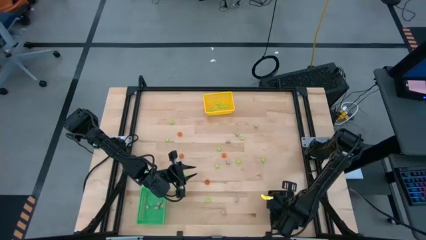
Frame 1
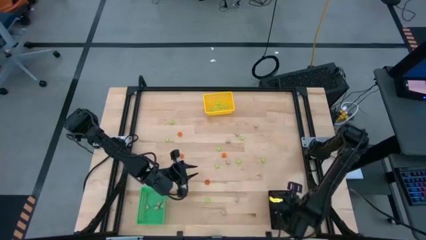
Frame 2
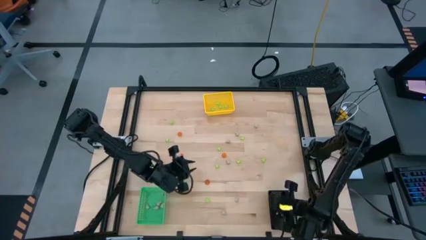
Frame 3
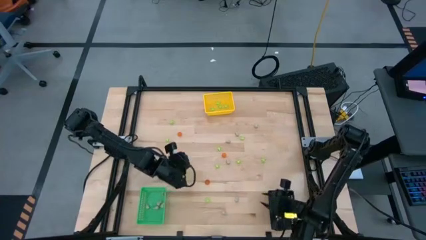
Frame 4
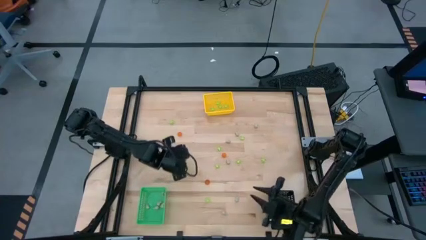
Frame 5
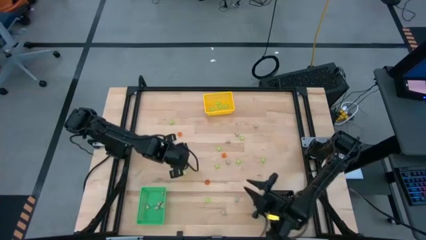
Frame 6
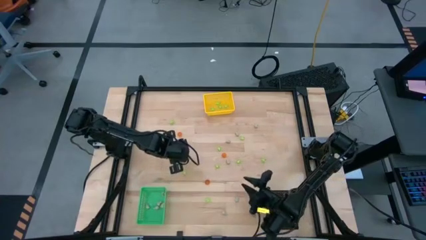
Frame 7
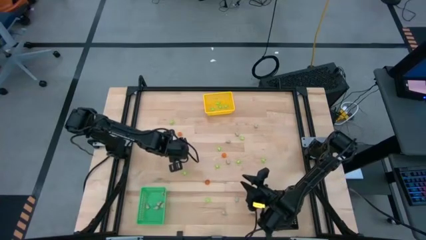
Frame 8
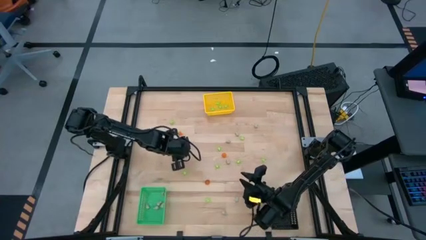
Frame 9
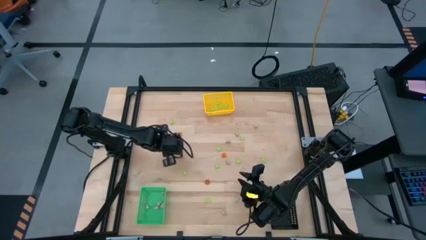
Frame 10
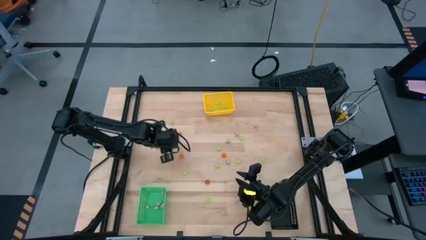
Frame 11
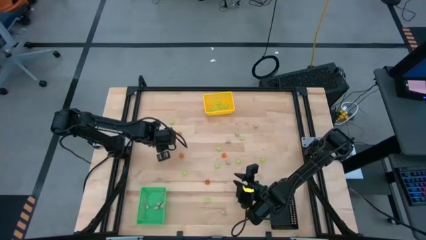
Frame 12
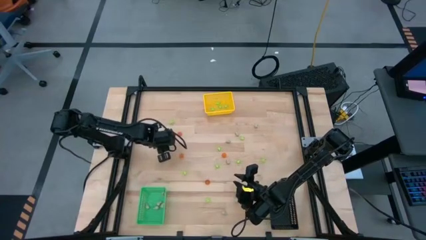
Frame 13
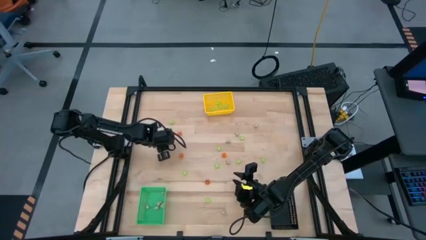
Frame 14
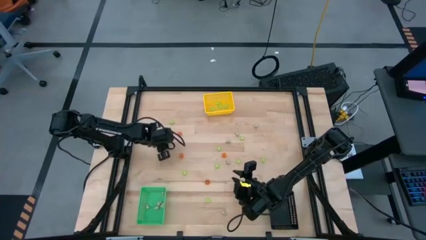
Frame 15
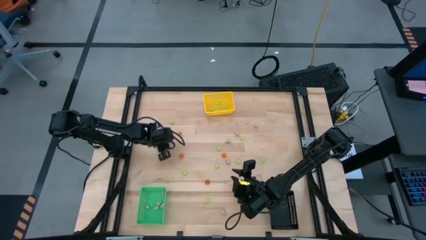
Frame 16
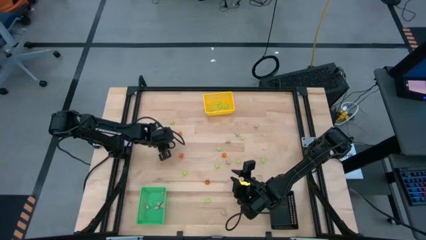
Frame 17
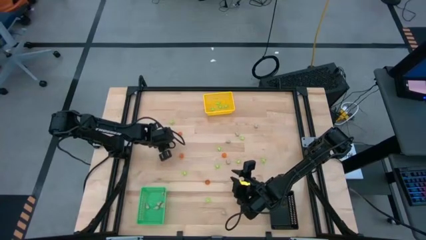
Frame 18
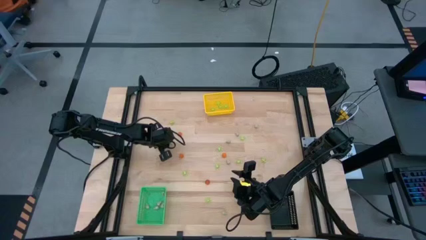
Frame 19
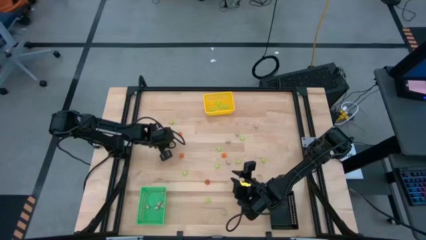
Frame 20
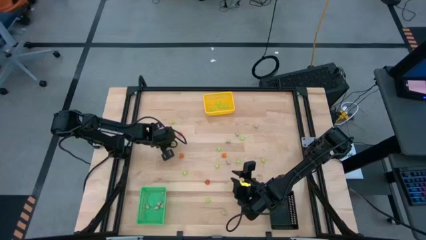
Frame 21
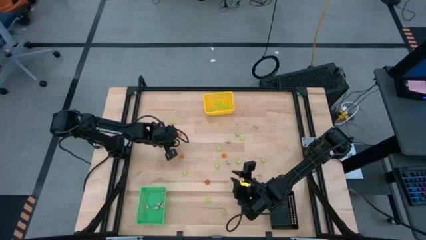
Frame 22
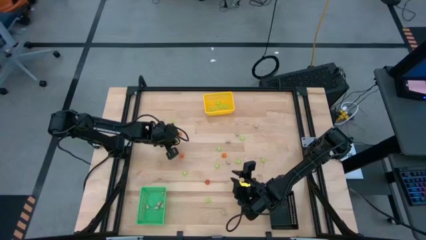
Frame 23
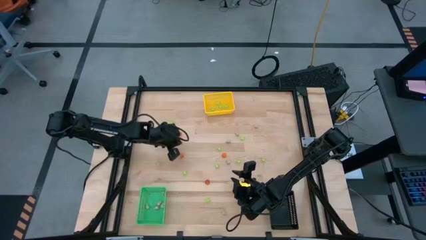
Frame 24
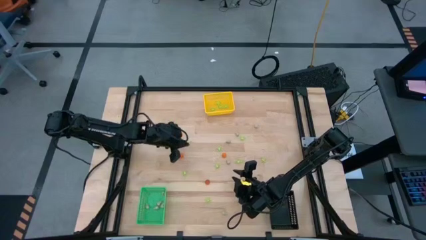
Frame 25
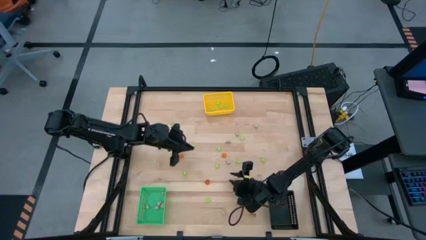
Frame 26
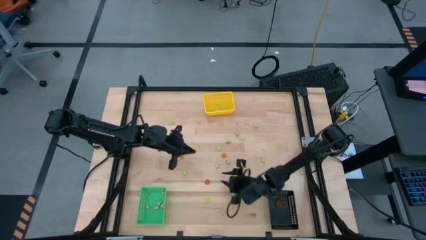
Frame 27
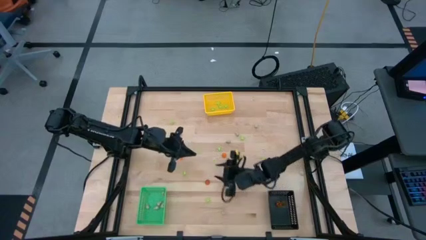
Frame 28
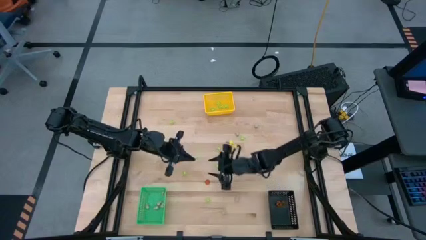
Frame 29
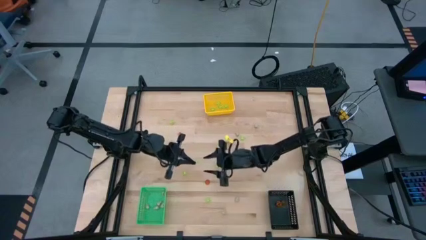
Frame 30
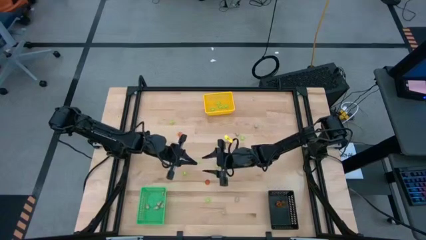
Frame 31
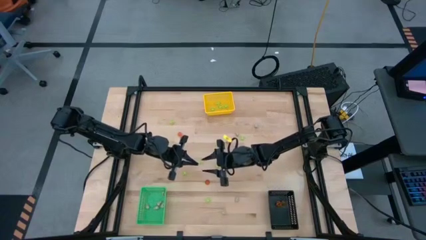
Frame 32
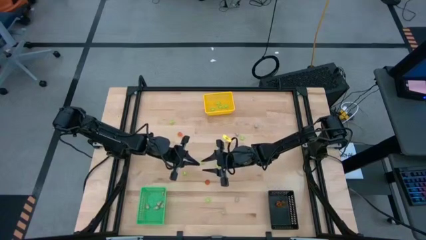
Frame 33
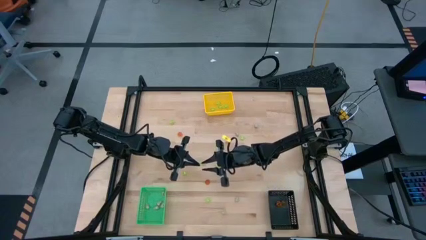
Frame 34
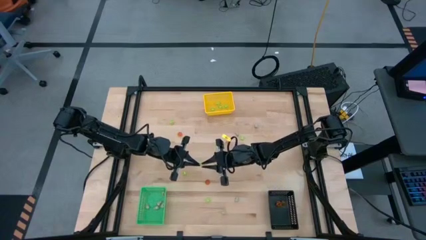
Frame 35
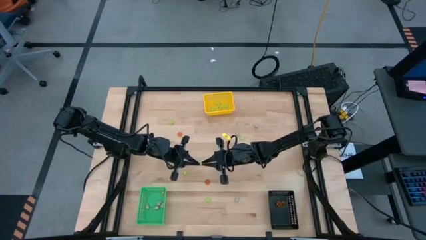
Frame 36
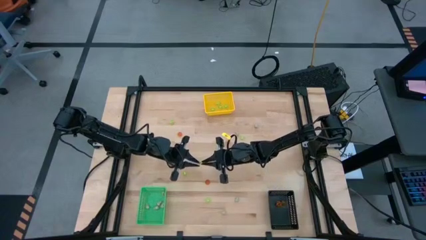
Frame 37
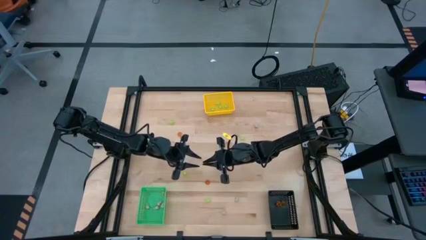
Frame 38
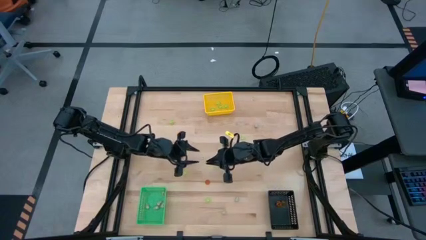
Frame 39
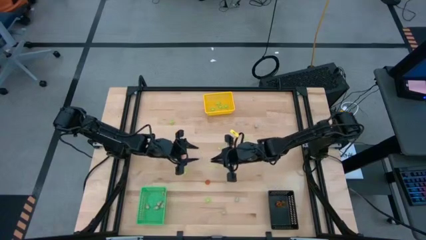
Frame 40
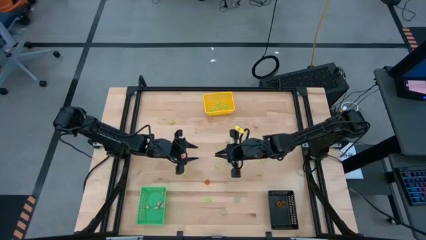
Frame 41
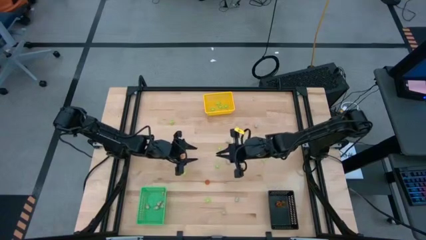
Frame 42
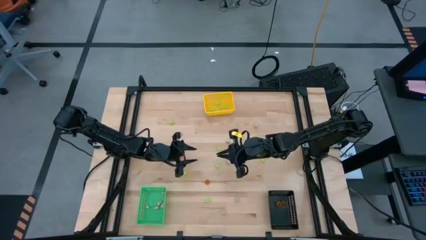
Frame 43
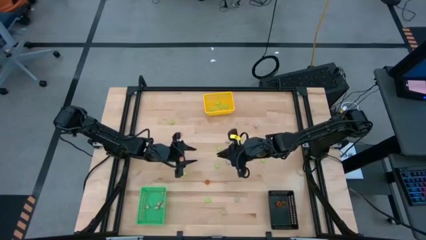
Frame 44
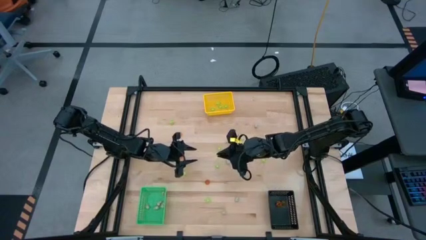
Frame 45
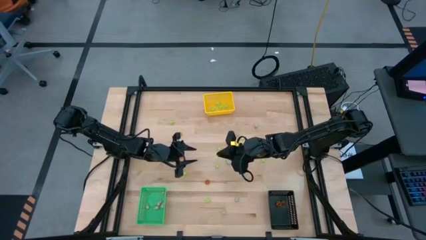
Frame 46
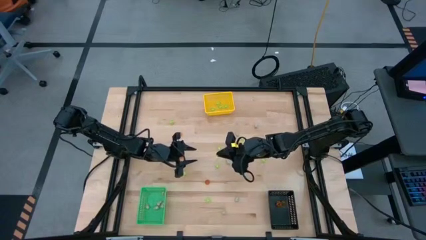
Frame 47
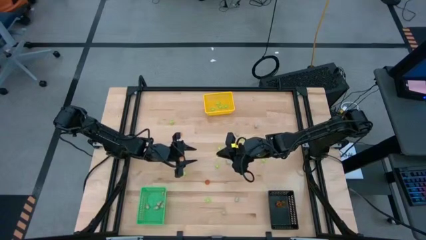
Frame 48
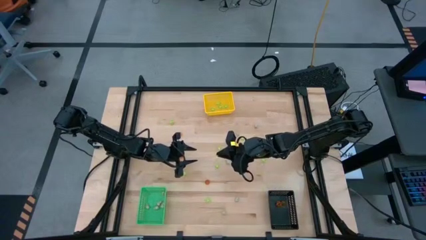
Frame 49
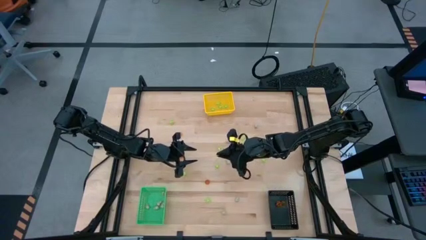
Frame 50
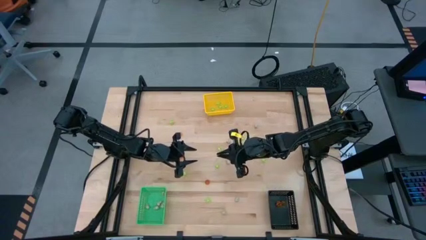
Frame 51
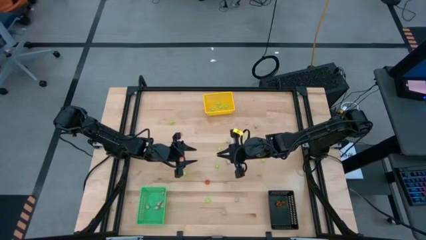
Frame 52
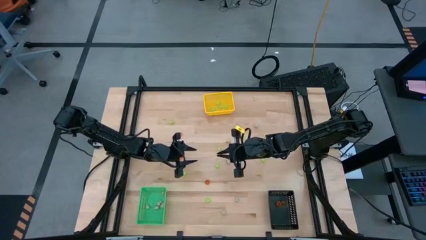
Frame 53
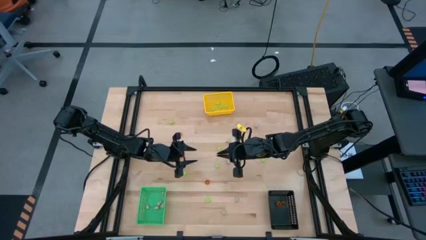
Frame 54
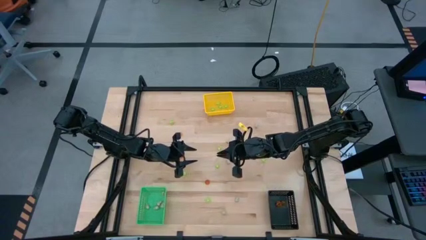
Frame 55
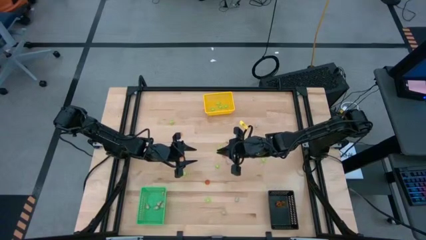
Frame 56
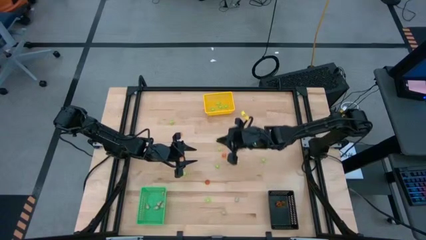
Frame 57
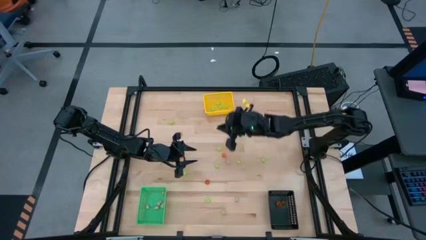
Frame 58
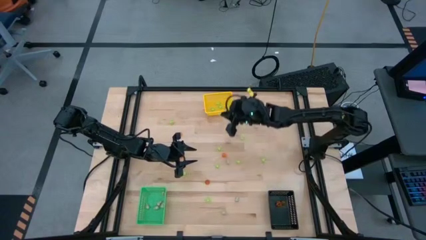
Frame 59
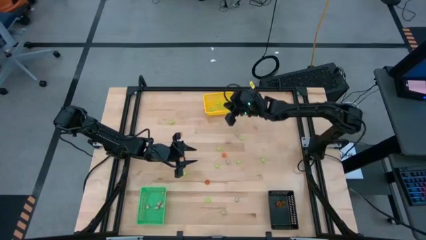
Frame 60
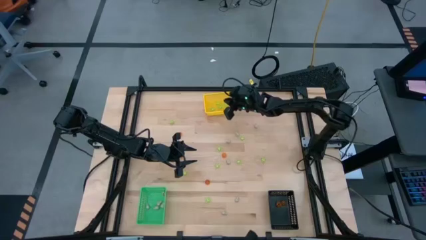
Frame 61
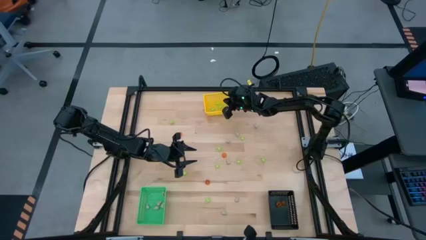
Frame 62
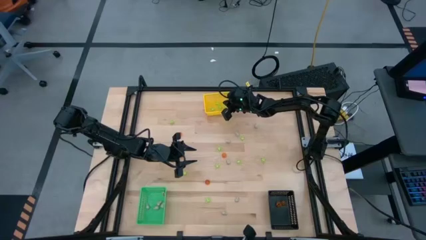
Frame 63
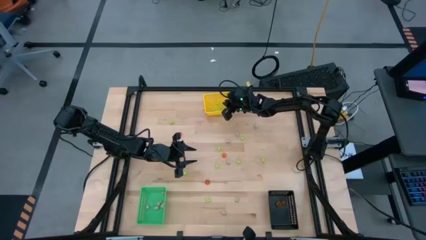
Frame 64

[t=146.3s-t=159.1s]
Task: Sort Halloween decoration
Put the green spider toy into the yellow bin
